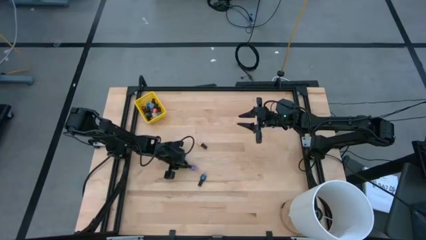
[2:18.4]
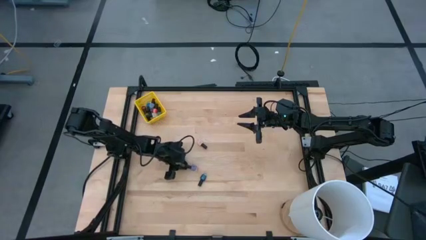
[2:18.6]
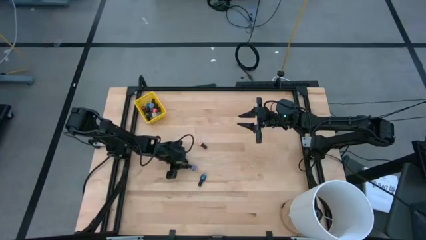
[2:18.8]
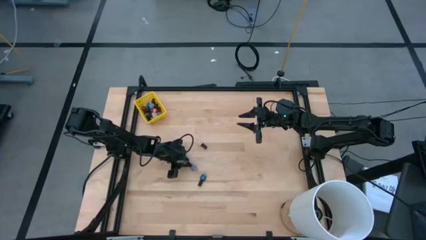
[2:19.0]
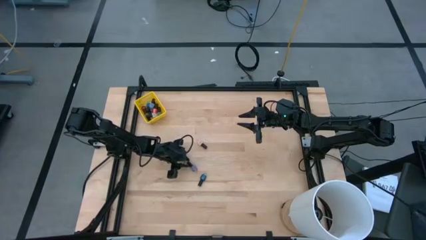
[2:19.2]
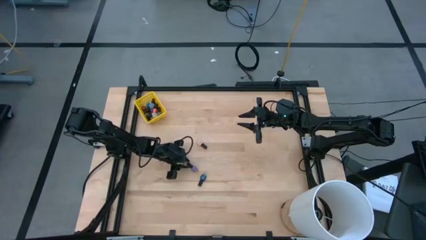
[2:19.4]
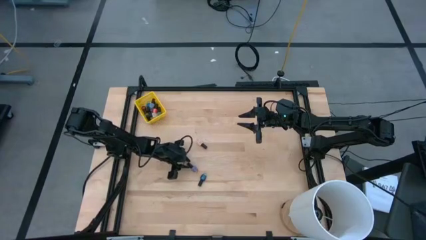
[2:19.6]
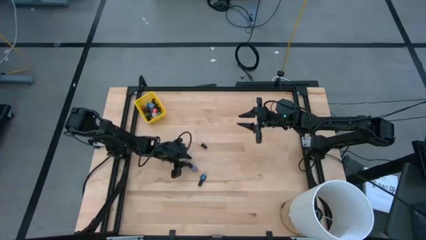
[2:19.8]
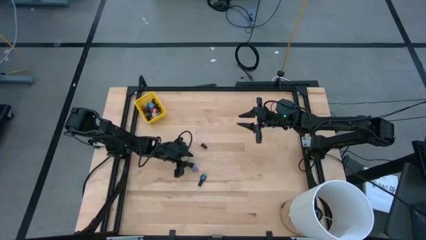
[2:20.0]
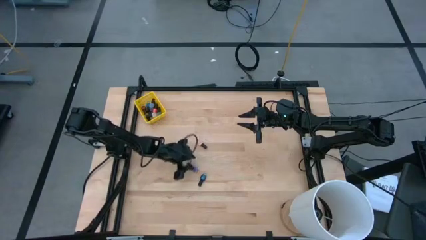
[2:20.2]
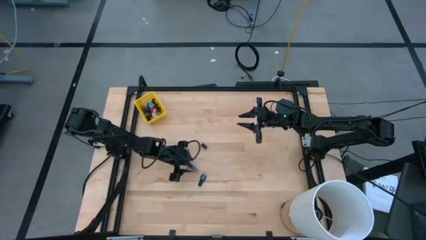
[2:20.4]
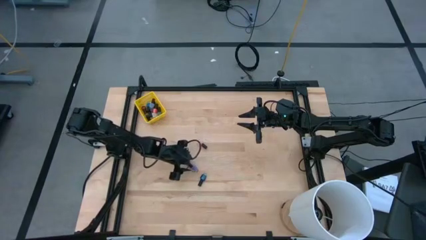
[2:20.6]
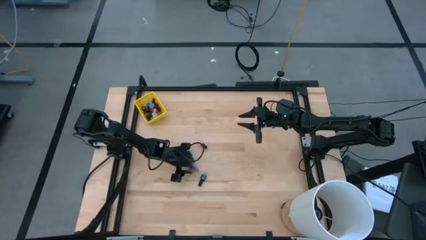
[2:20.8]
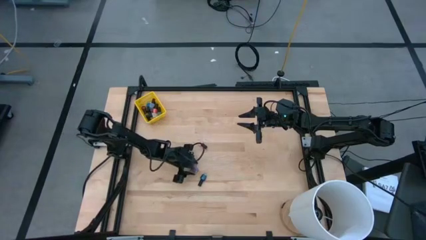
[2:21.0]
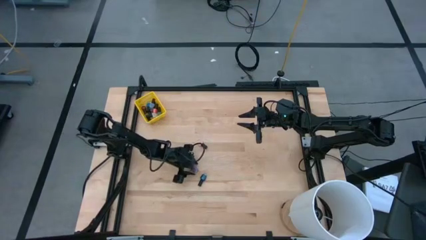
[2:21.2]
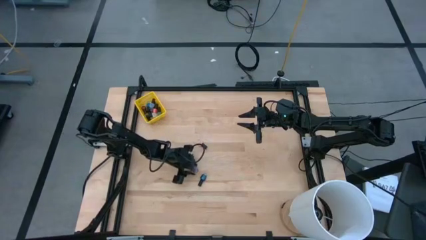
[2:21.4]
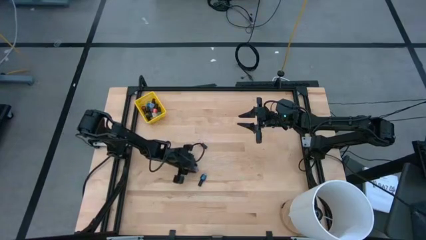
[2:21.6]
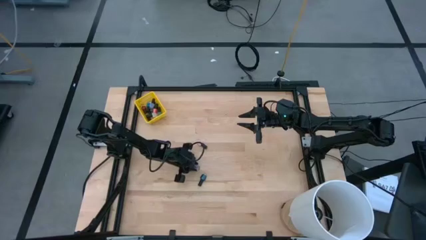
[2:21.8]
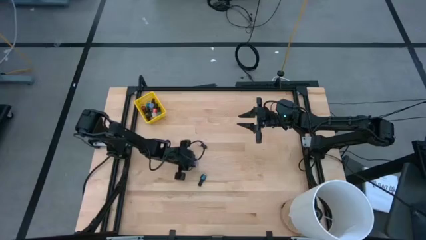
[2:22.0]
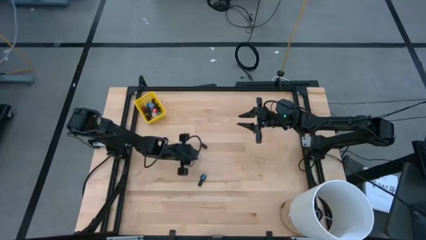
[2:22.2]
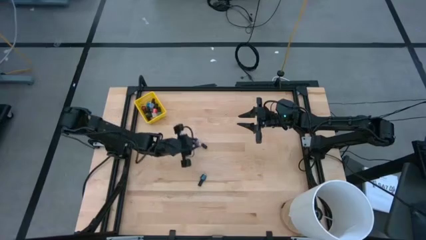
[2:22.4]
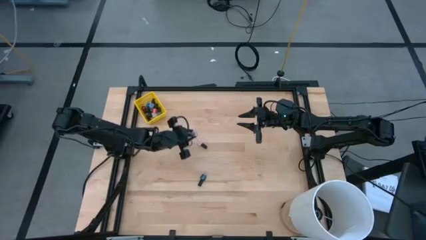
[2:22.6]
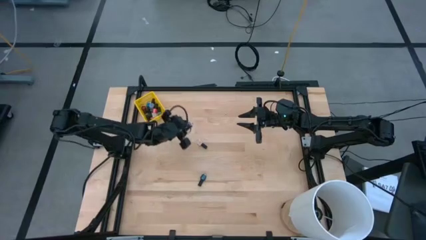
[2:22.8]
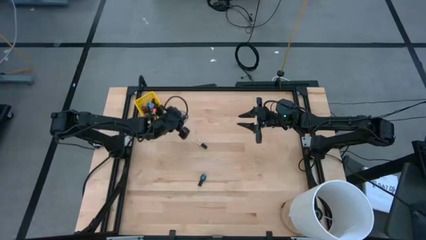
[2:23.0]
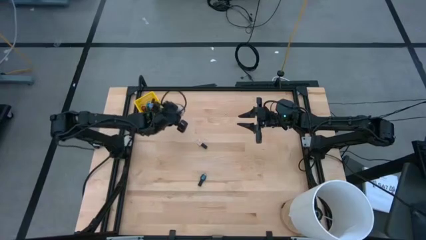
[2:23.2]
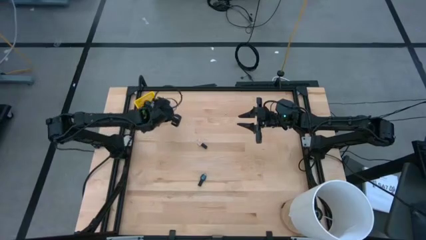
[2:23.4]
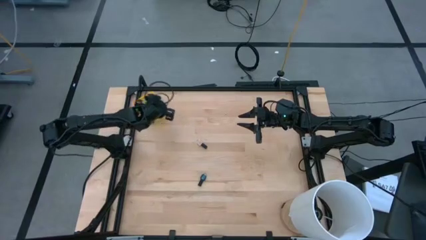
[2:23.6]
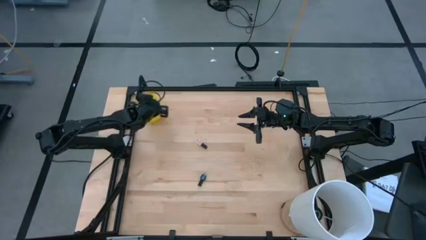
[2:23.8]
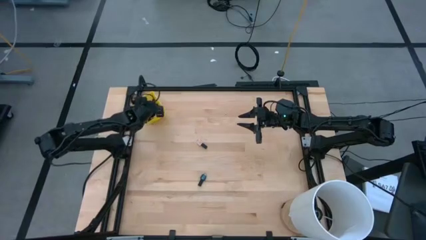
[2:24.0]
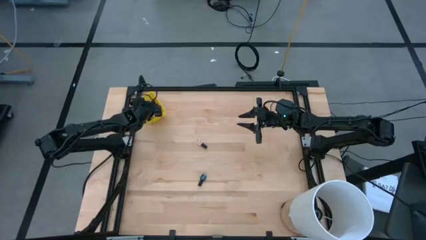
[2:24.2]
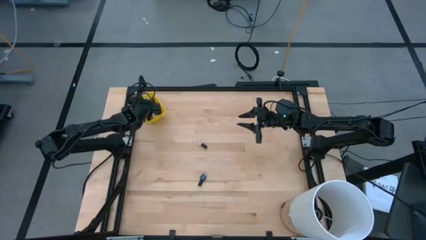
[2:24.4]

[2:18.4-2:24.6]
Task: Pick & Place Nail Polish
Put the purple nail polish into the yellow bin

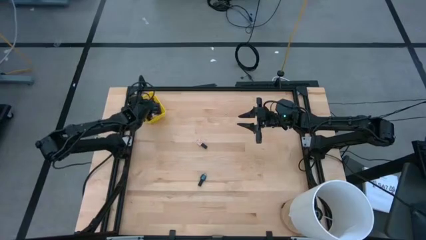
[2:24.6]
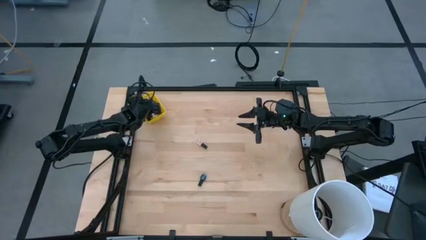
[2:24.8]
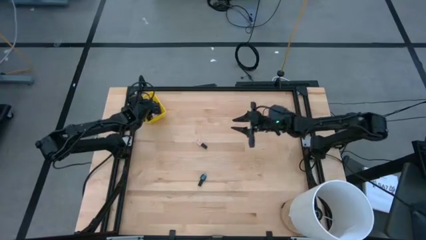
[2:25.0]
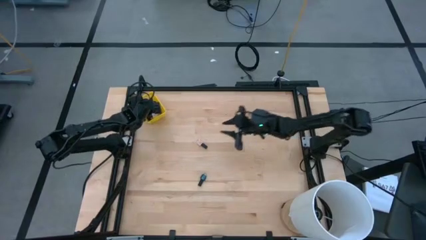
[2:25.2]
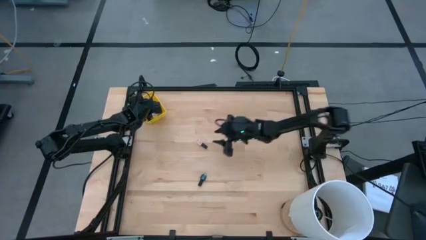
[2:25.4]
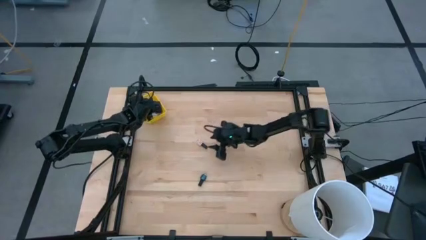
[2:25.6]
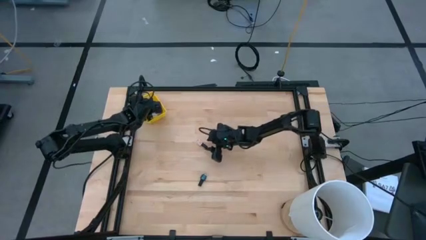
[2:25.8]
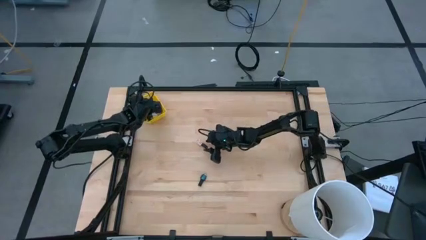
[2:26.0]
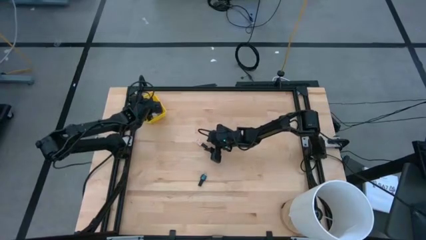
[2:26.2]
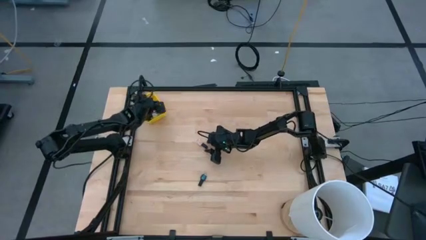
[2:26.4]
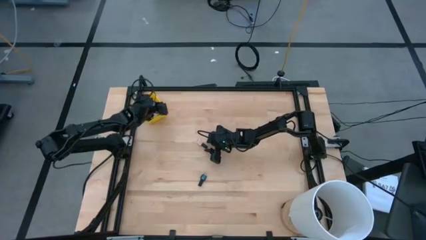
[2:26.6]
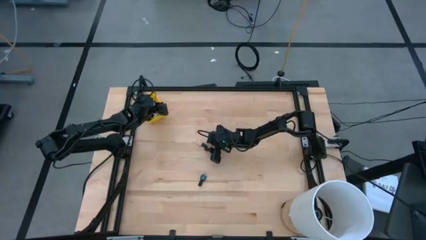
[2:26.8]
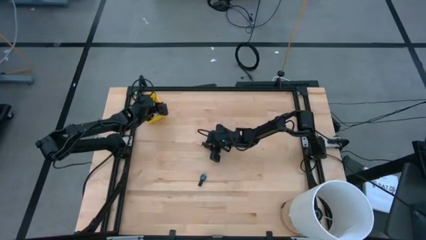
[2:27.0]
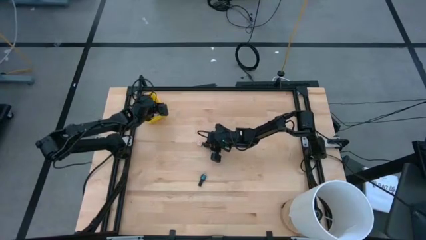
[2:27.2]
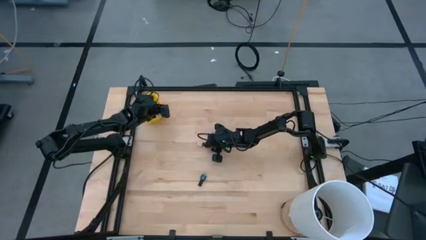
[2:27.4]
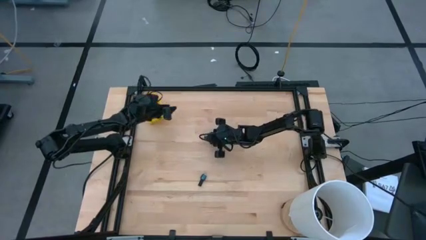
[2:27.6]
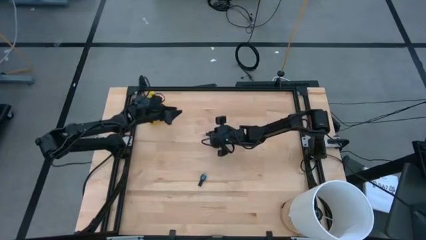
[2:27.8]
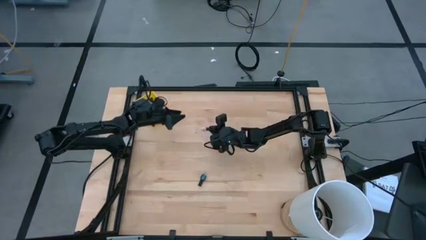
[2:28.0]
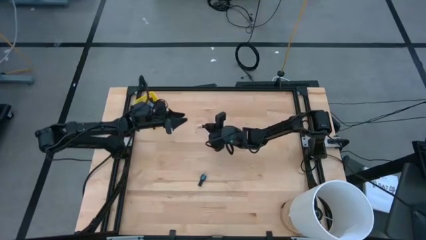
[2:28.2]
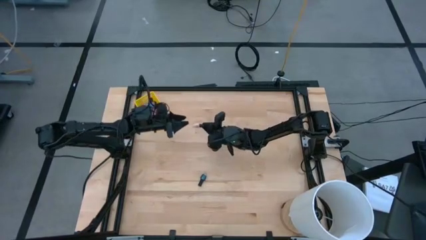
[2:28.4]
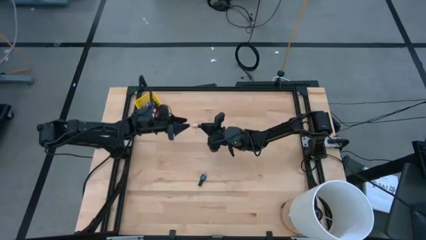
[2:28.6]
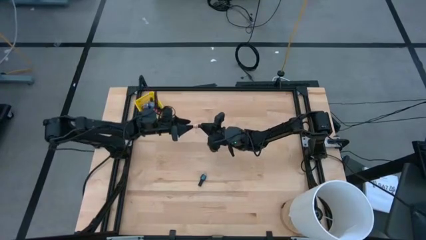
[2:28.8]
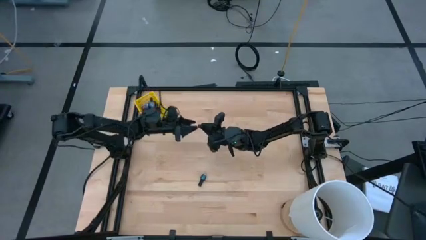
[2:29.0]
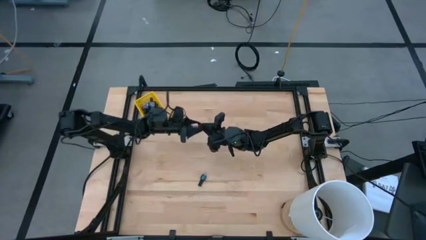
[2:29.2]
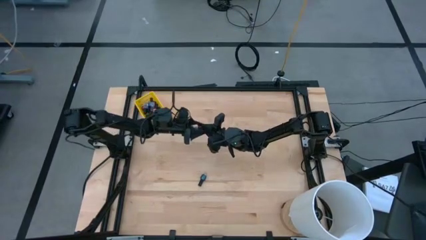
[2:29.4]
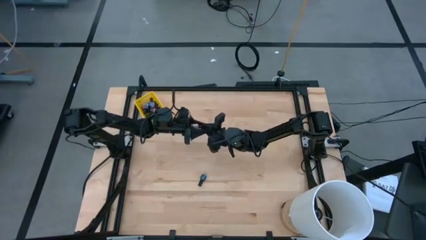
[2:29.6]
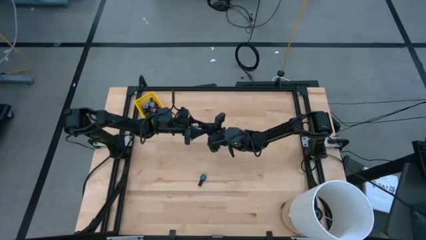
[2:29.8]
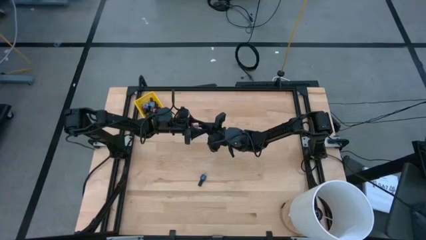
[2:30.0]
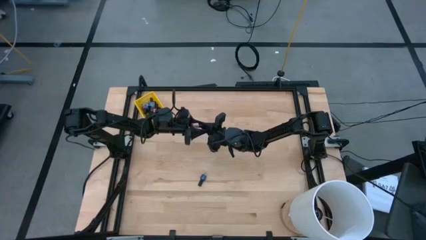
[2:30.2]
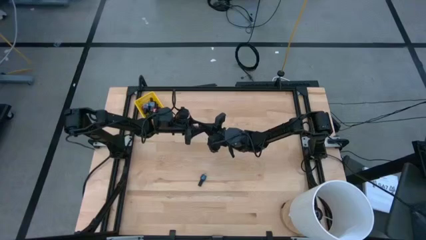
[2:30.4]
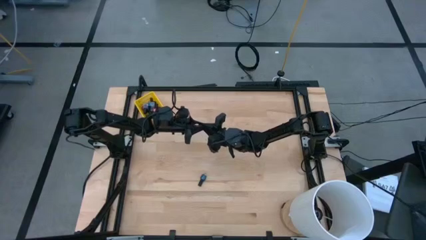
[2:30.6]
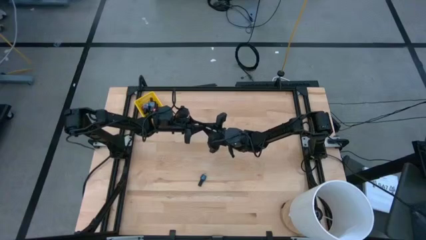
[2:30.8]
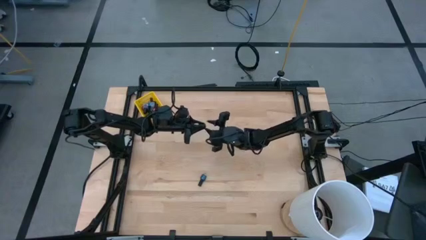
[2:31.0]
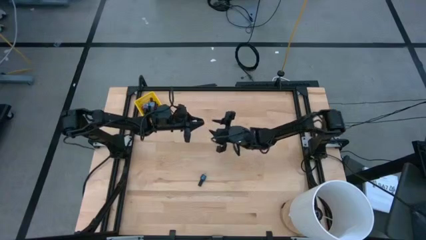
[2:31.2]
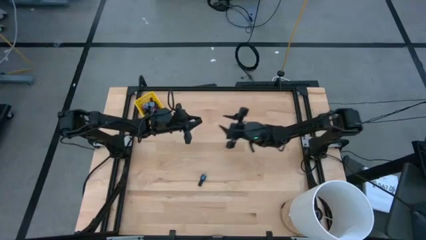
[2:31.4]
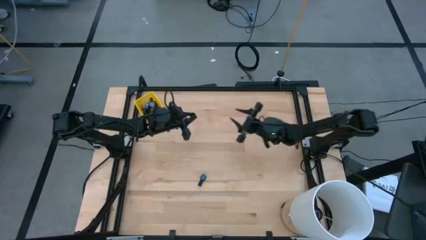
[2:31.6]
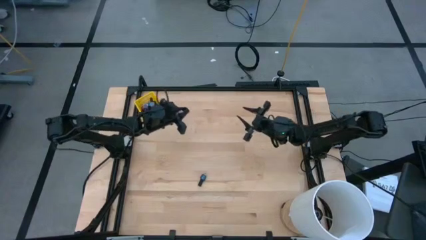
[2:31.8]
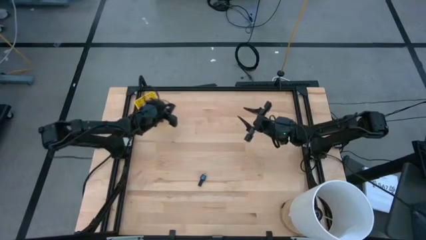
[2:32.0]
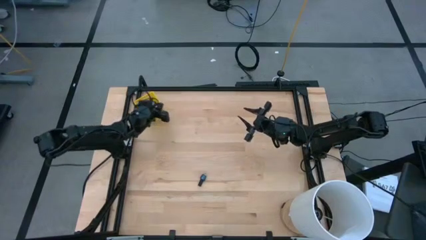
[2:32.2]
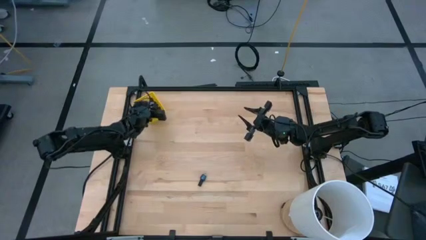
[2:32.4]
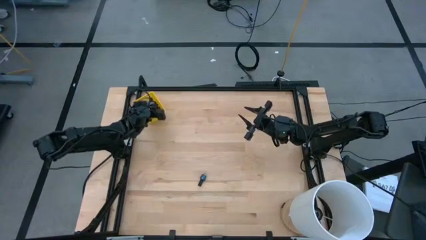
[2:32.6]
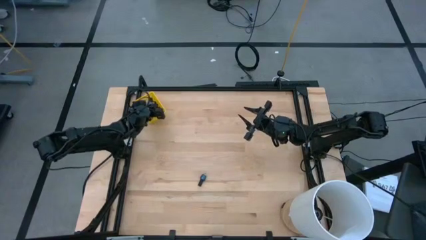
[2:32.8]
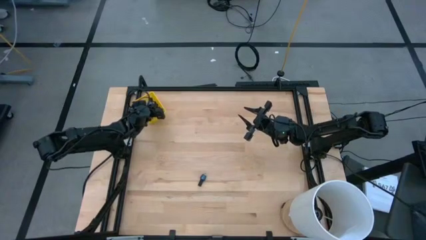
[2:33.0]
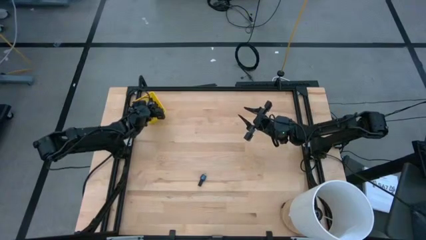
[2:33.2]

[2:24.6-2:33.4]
Put the light pink nail polish into the yellow bin

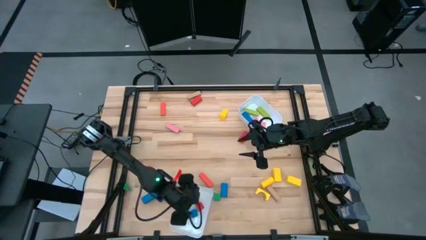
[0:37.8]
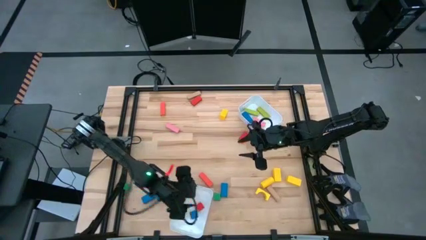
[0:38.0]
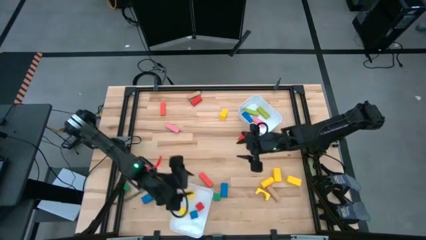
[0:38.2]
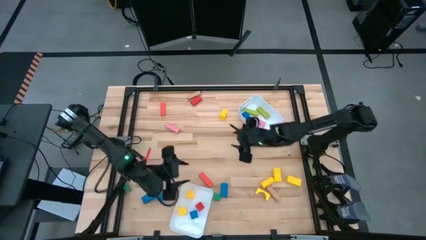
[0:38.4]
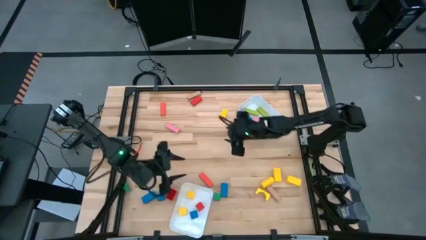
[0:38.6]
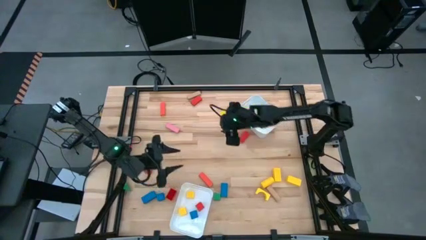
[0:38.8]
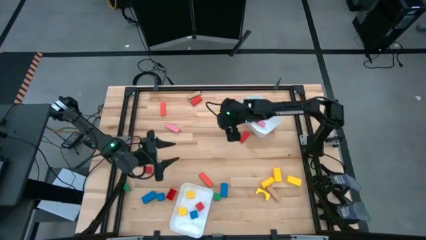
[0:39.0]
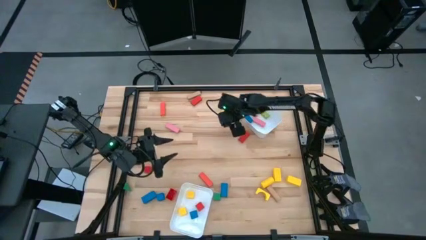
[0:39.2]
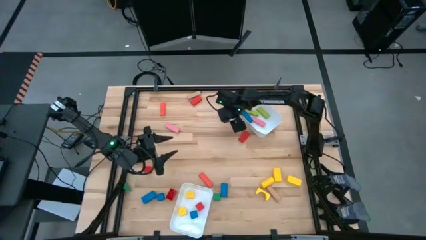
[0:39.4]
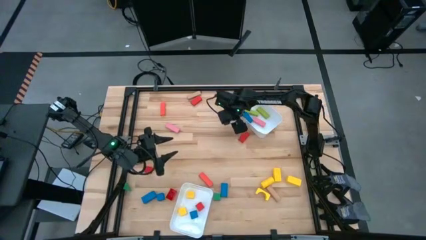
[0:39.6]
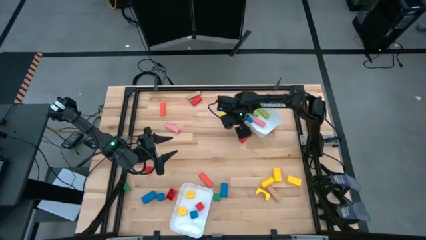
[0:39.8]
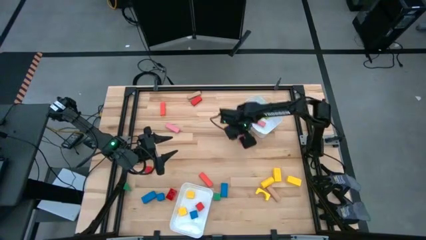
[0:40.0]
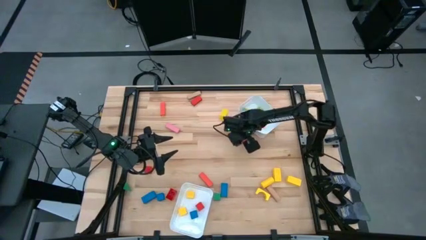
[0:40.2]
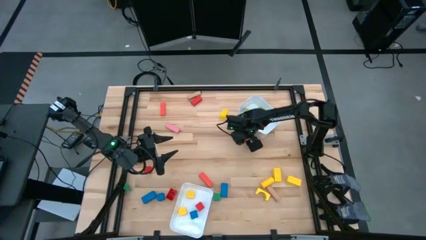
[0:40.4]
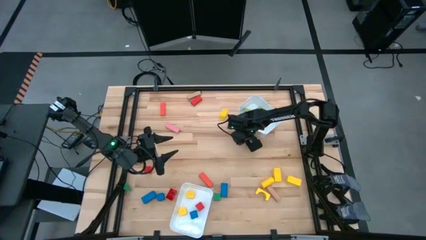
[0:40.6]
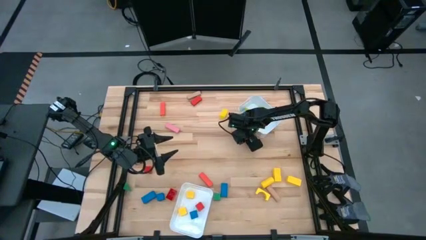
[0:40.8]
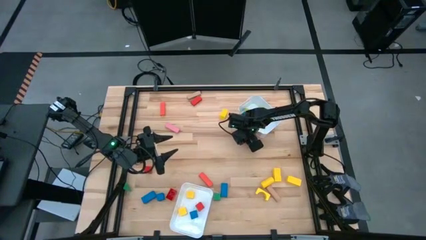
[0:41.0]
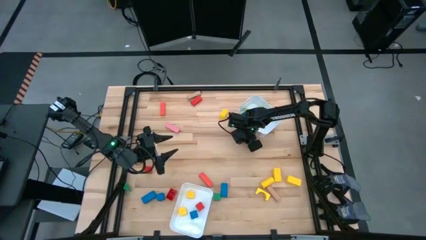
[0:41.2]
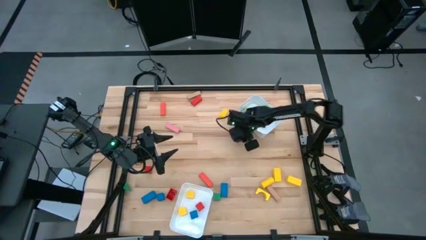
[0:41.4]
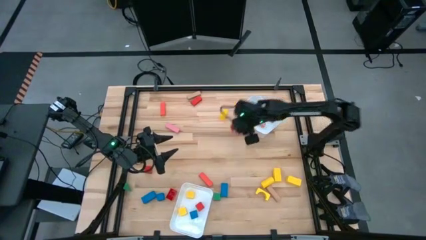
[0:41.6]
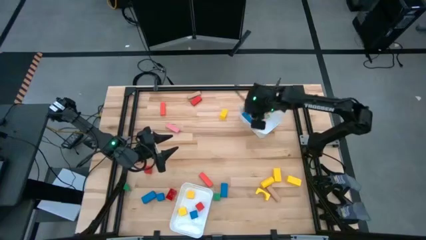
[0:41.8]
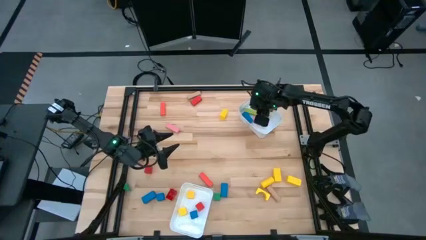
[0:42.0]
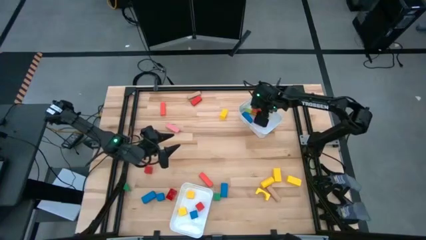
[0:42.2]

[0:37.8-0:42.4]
Task: Sort blocks by size
Put the red rectangle block into the top white bin
